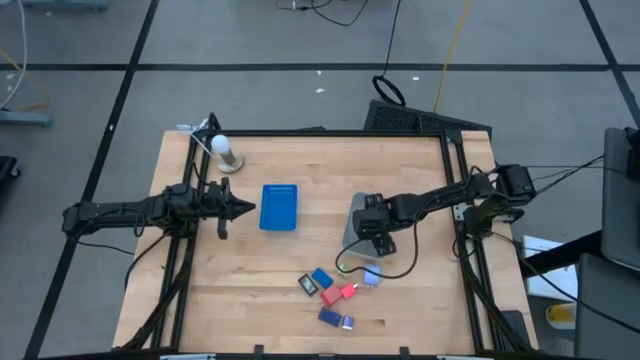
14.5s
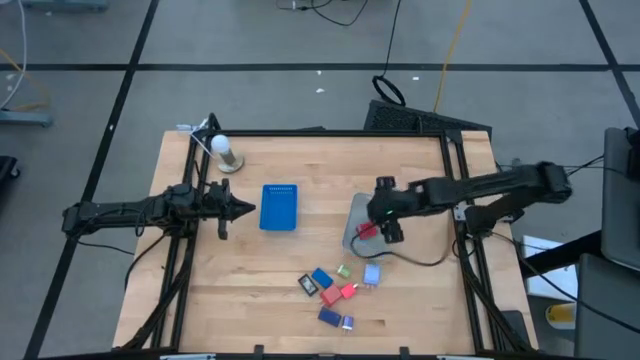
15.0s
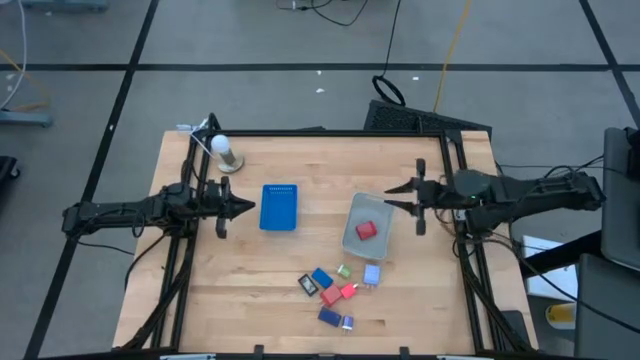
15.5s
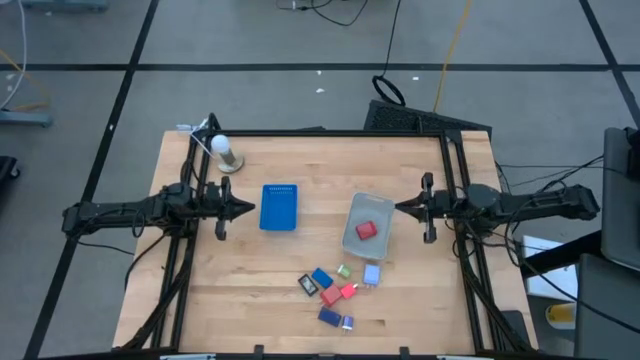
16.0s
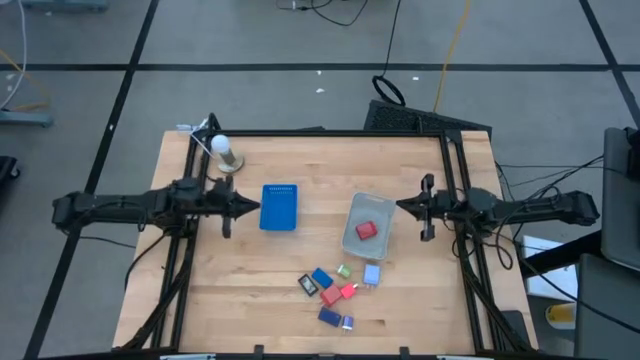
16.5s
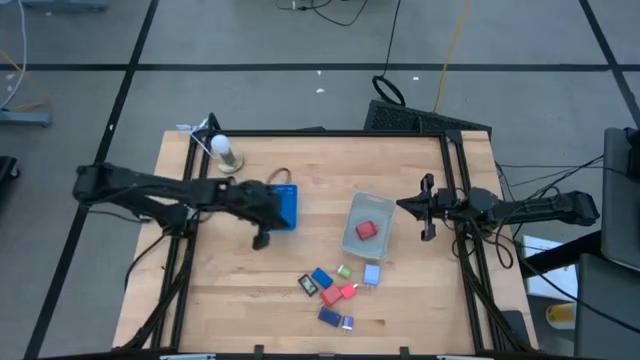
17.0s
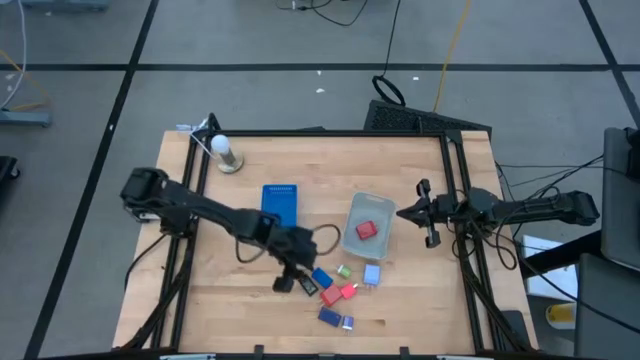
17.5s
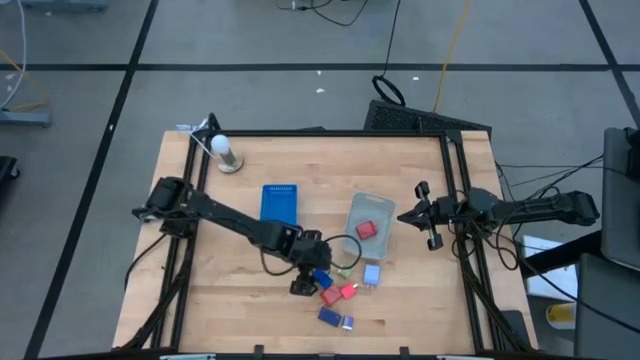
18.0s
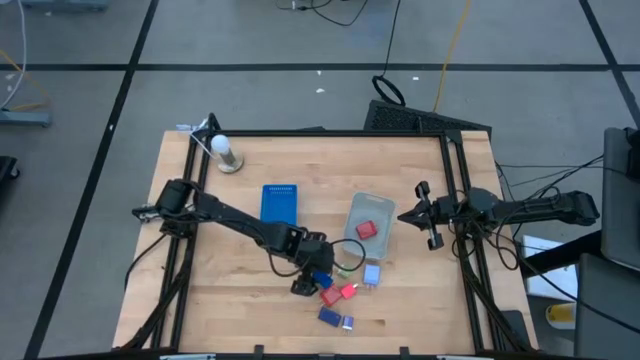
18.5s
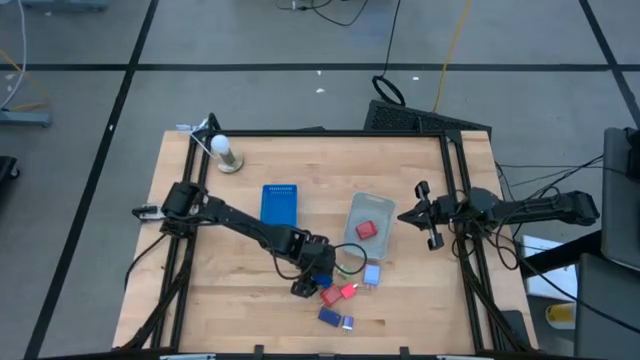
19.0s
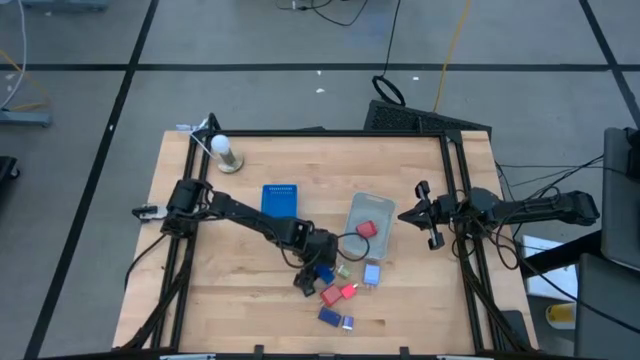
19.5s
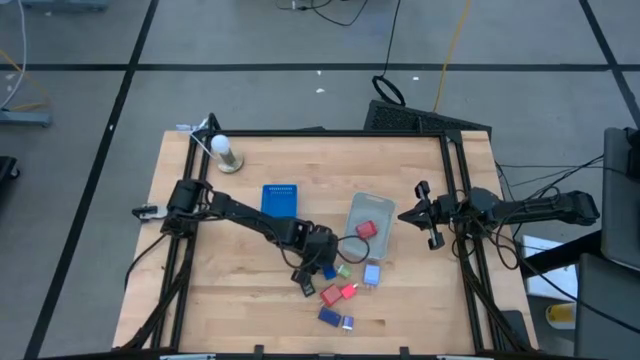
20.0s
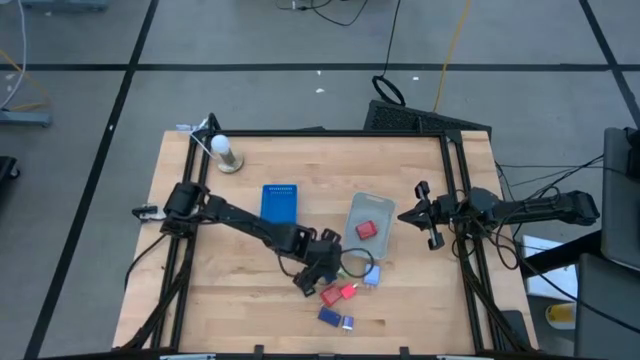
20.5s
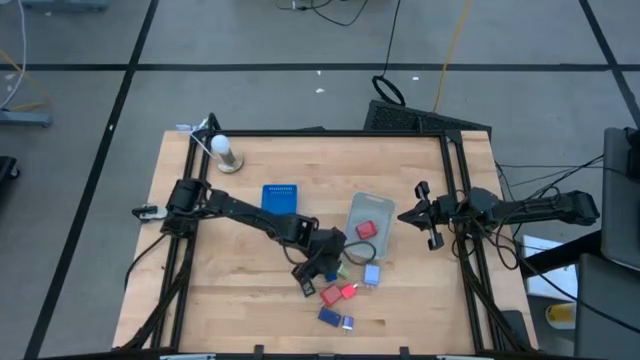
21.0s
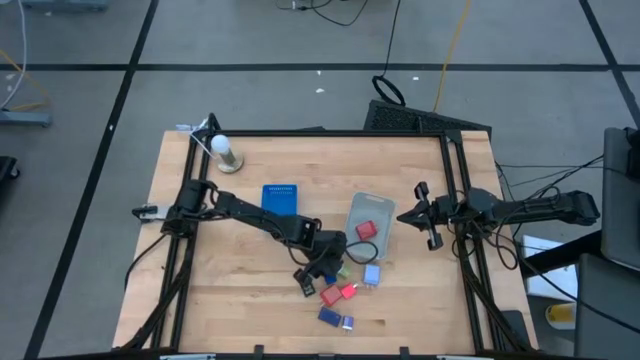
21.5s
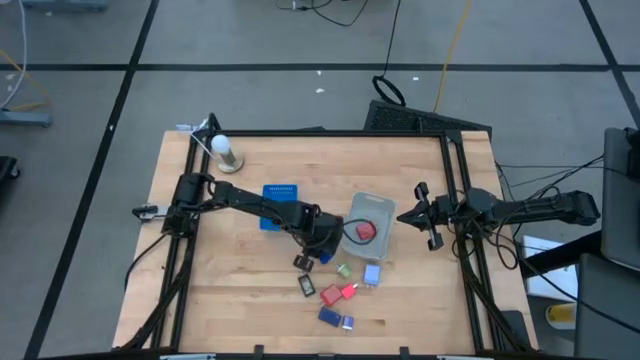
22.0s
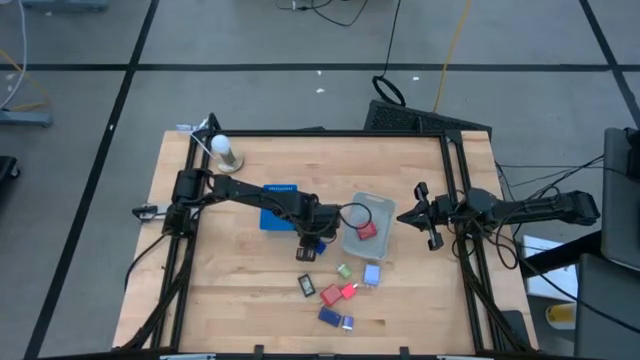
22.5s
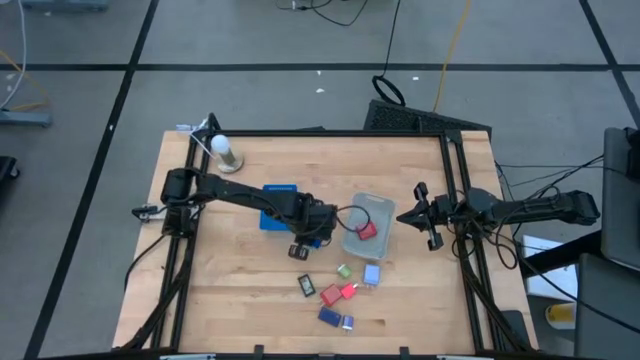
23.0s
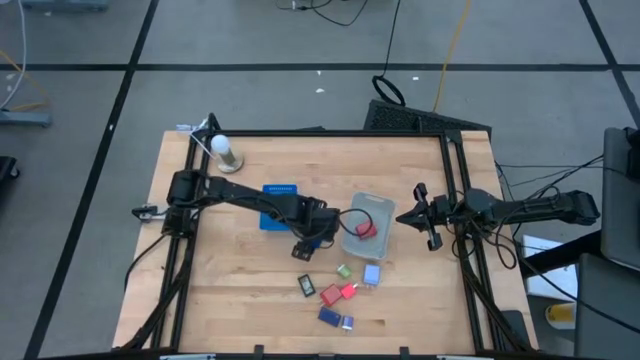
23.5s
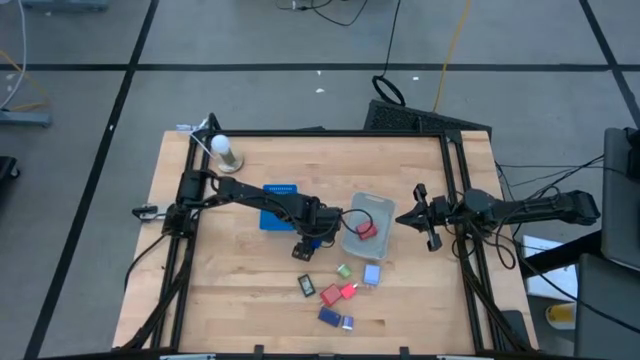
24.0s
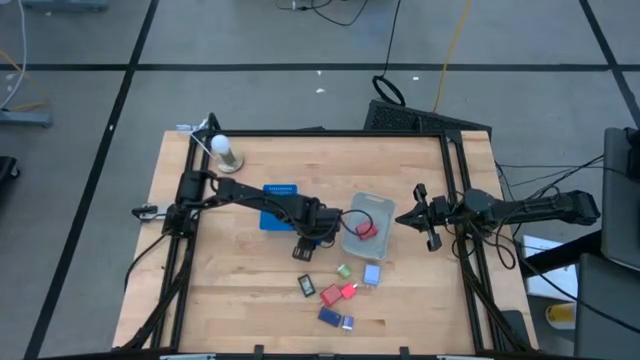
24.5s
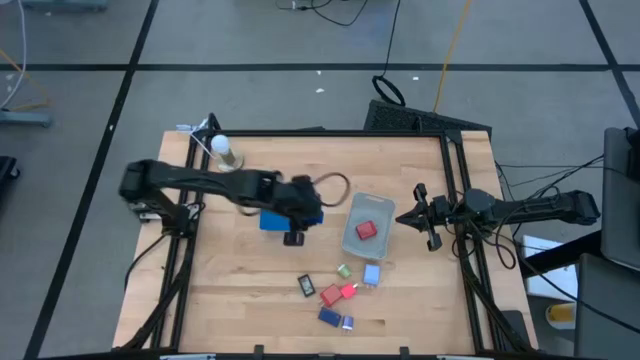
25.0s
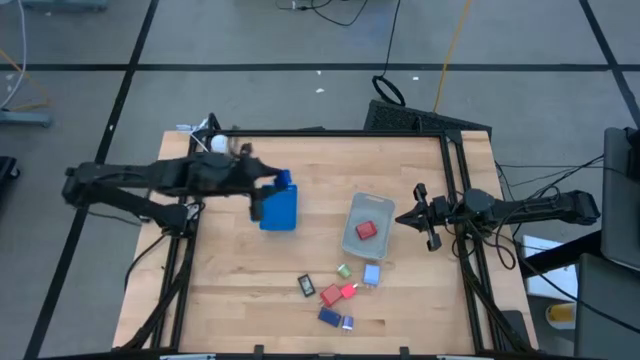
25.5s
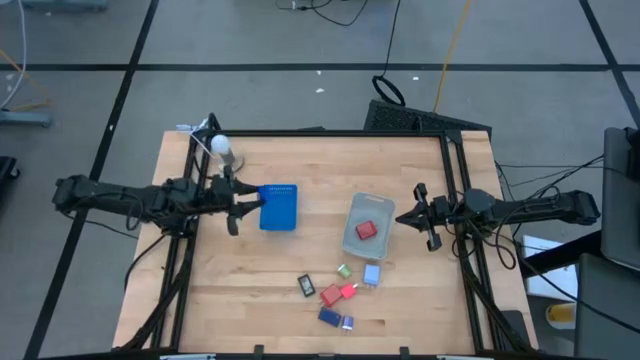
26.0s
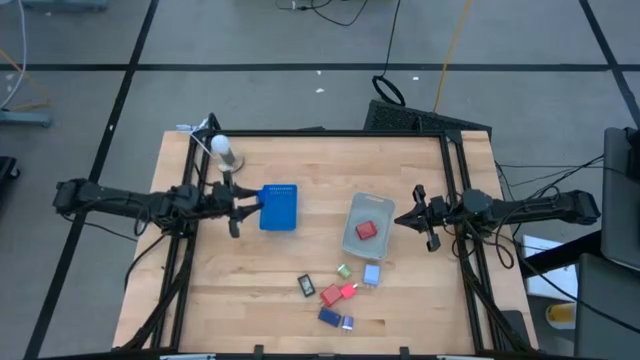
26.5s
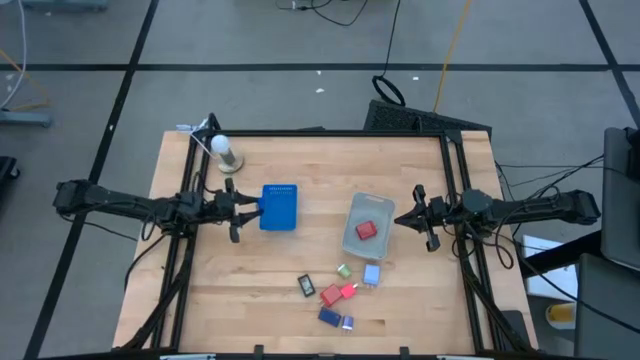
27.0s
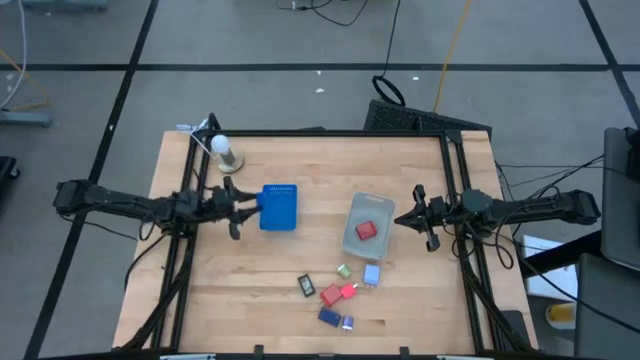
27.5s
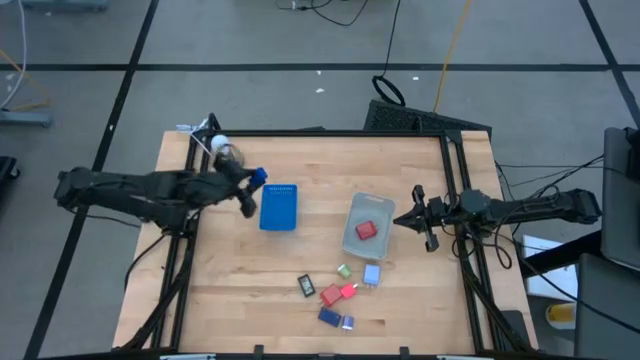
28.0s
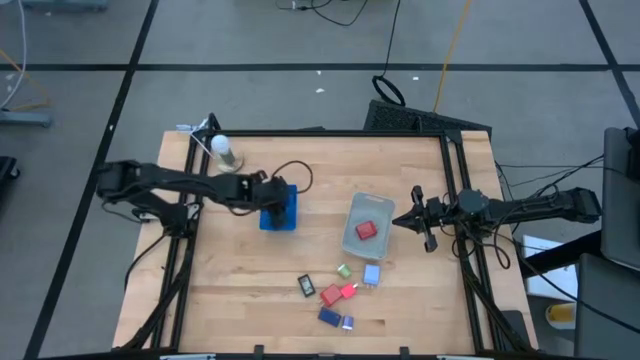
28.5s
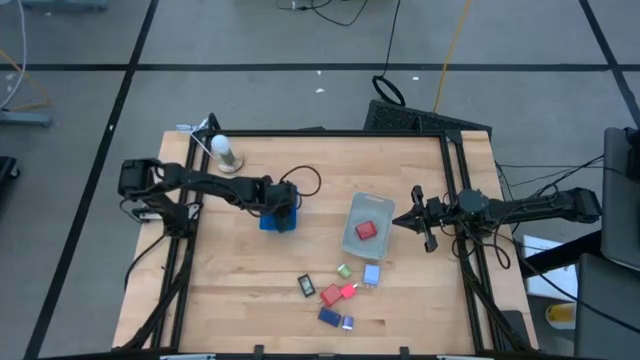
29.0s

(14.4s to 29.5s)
Task: Pick & Place Office items
Put the blue digital clock into the blue bin

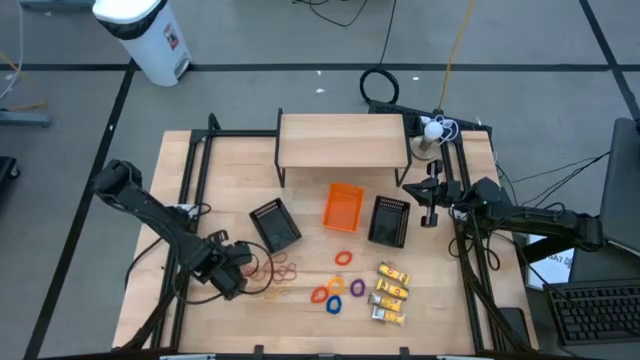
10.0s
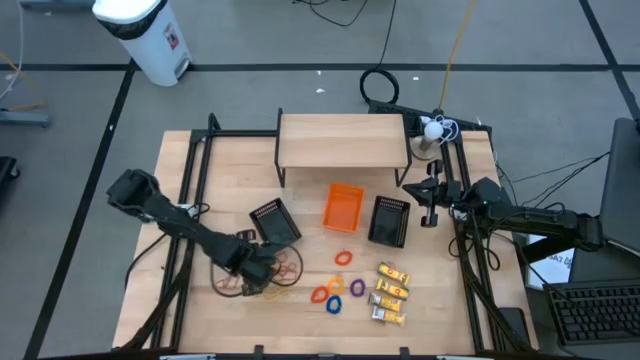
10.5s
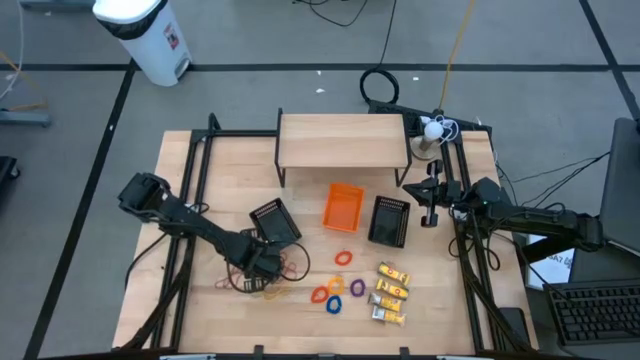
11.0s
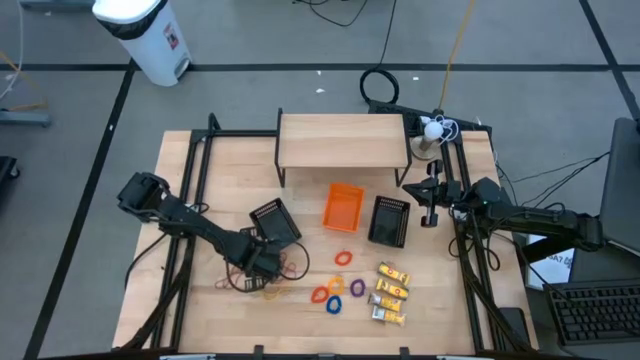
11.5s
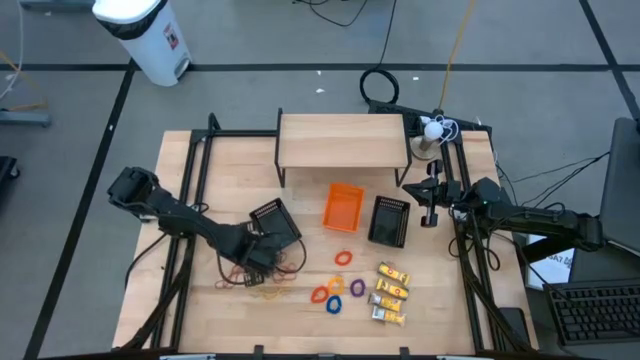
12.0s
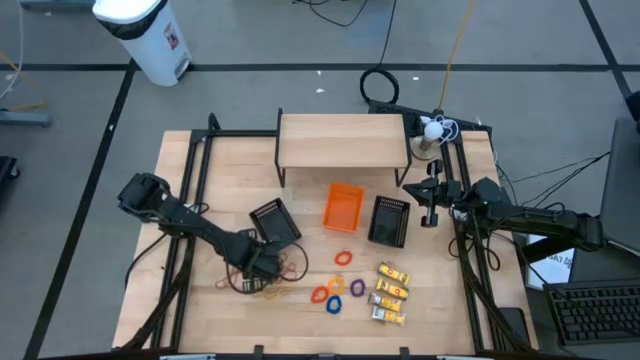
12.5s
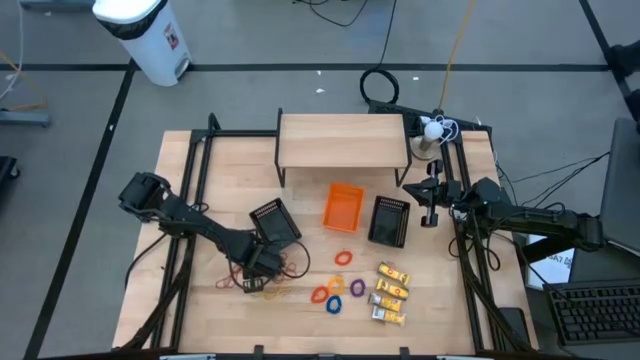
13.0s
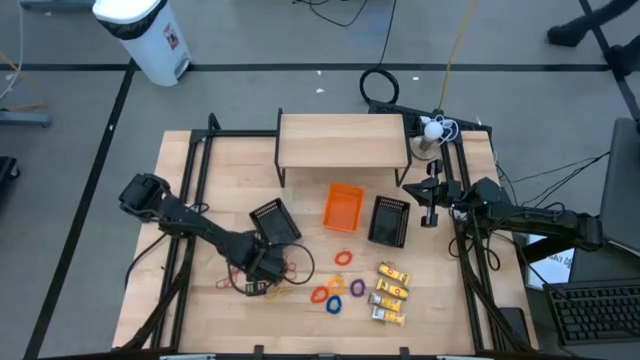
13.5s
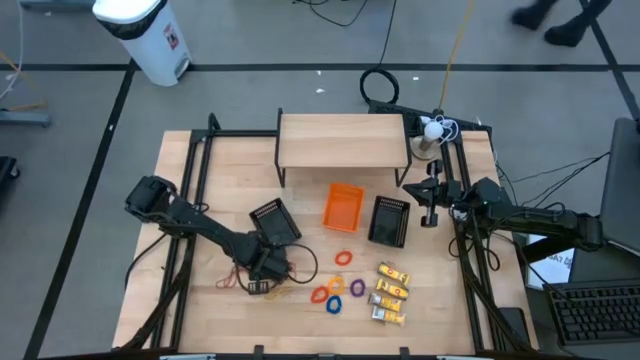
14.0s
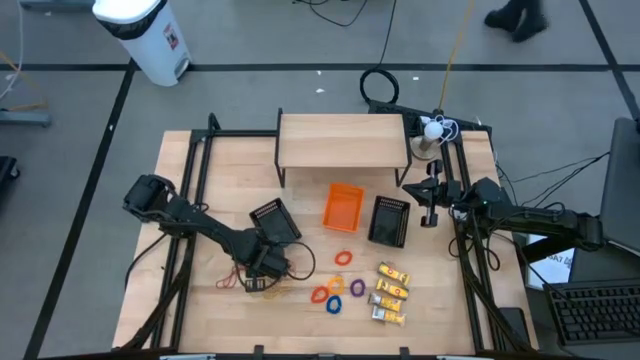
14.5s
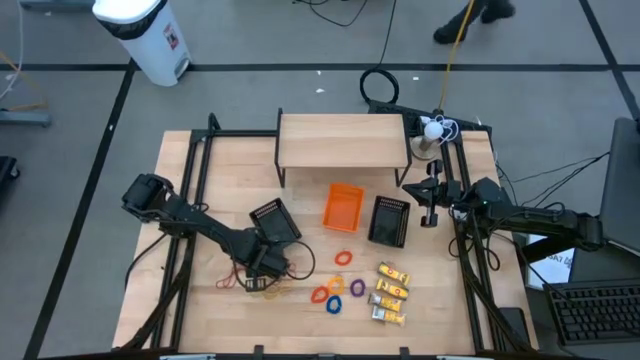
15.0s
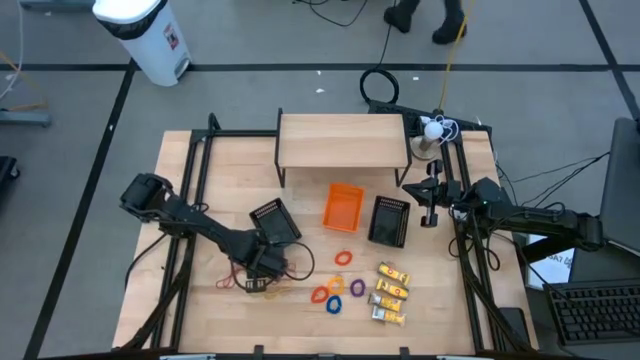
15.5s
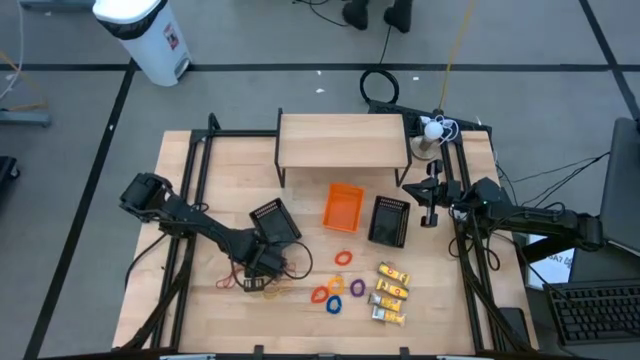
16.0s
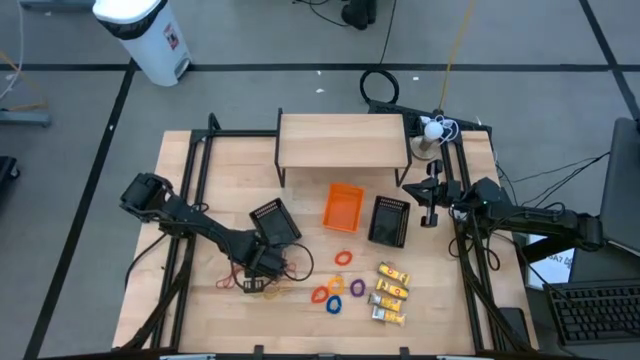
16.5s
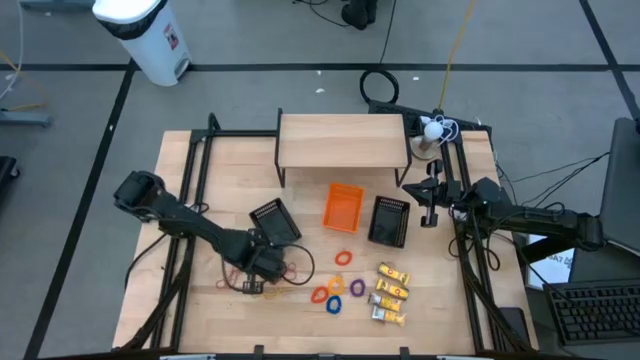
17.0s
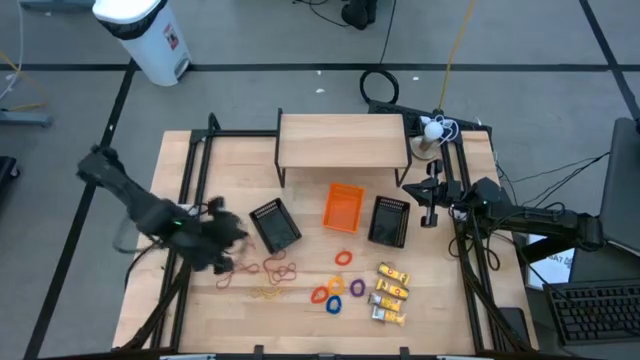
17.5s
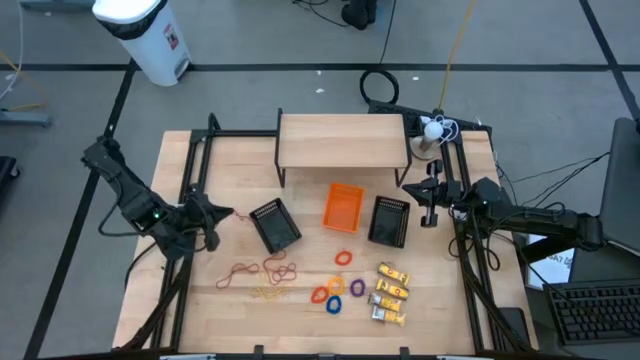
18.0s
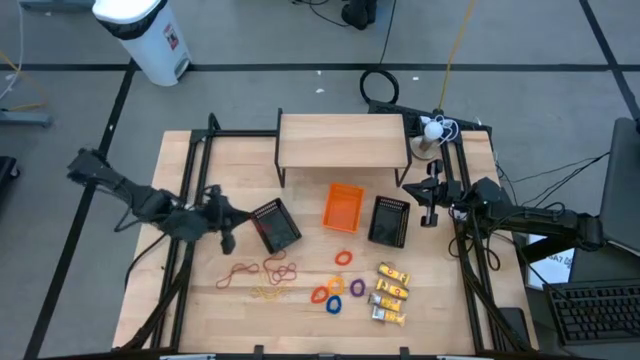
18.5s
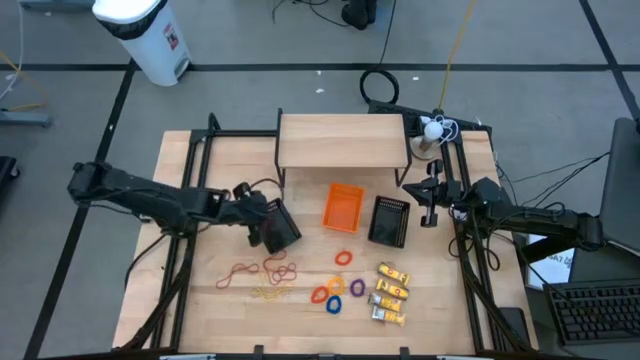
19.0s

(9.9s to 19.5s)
Task: Pick & Place Office Desk Supplies
Put the red rubber band into the left black bin
